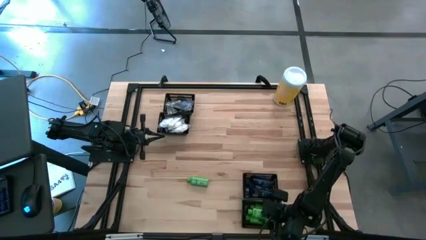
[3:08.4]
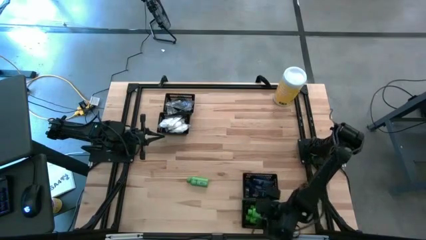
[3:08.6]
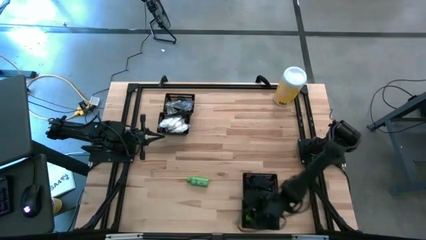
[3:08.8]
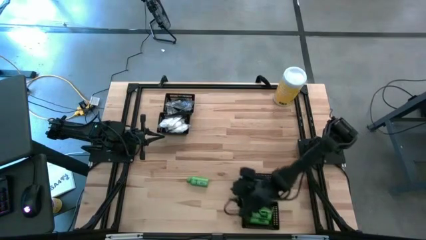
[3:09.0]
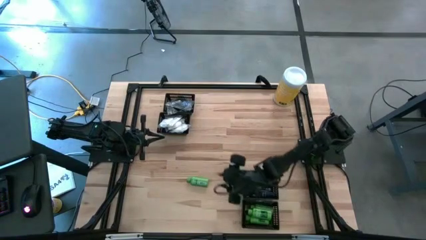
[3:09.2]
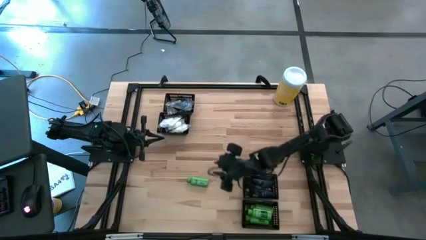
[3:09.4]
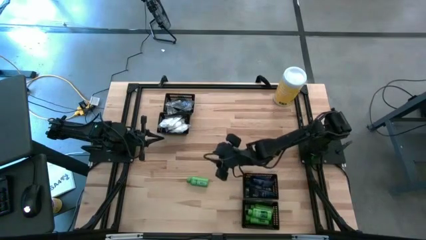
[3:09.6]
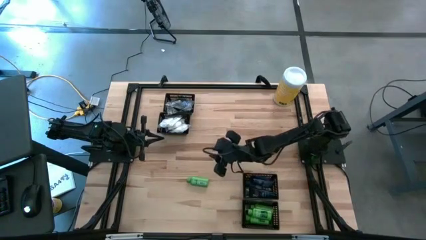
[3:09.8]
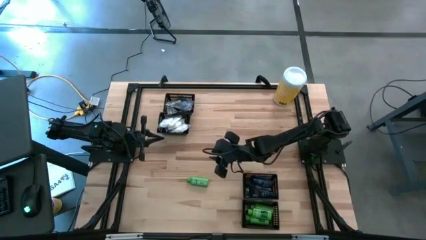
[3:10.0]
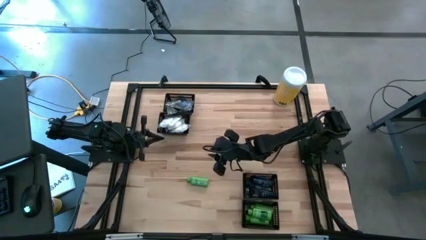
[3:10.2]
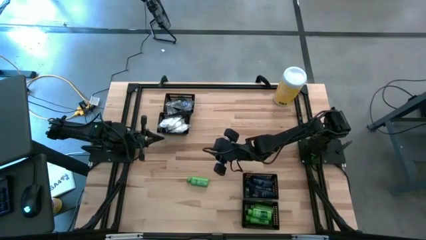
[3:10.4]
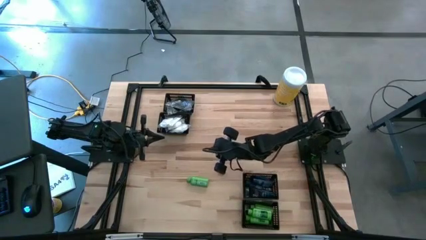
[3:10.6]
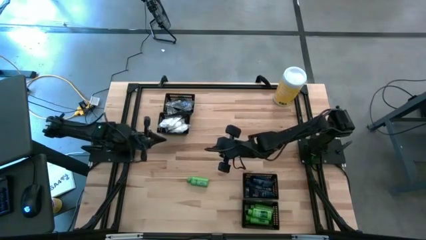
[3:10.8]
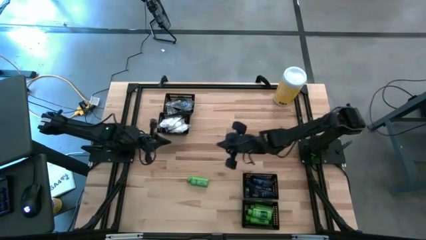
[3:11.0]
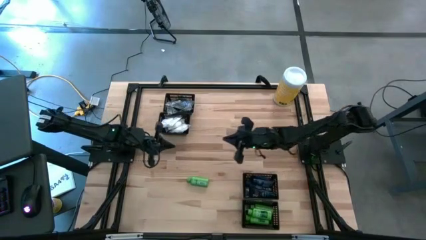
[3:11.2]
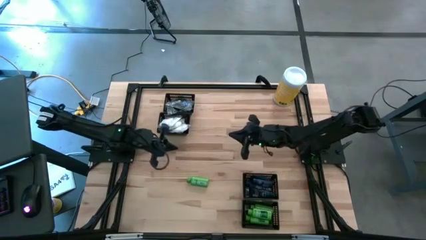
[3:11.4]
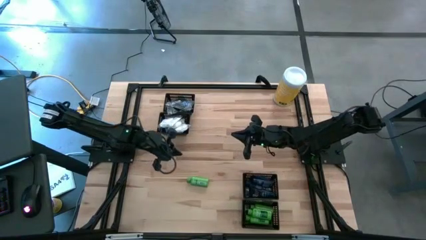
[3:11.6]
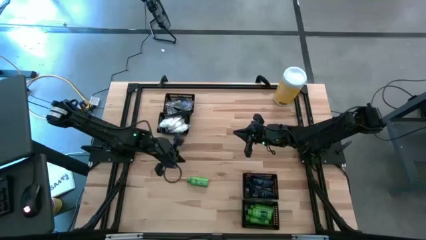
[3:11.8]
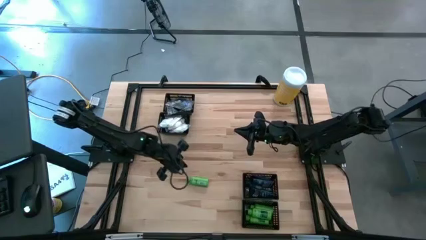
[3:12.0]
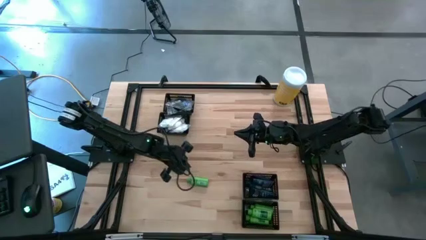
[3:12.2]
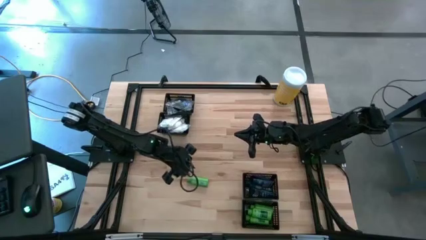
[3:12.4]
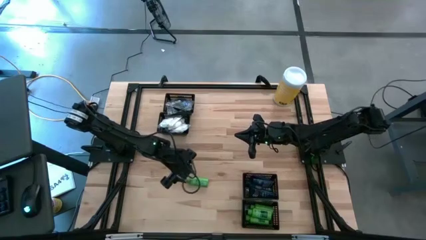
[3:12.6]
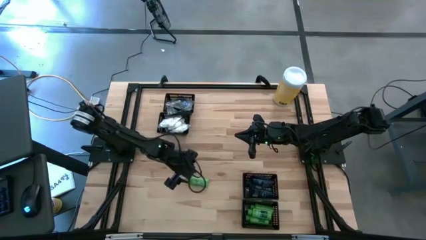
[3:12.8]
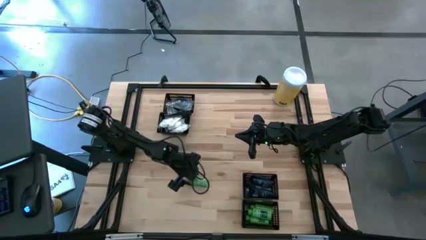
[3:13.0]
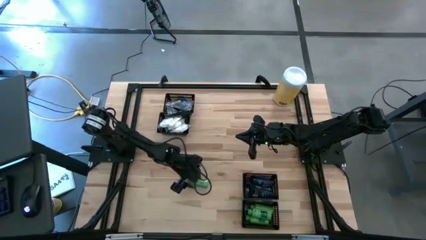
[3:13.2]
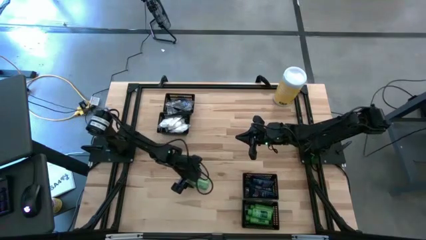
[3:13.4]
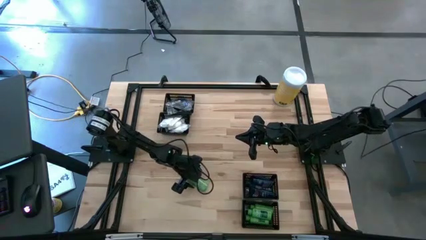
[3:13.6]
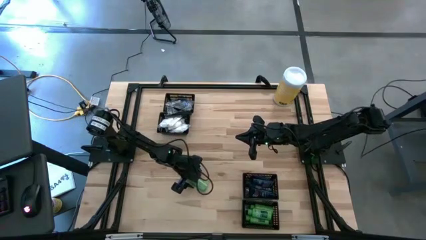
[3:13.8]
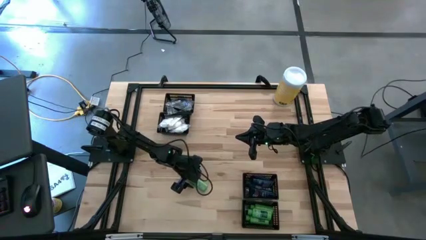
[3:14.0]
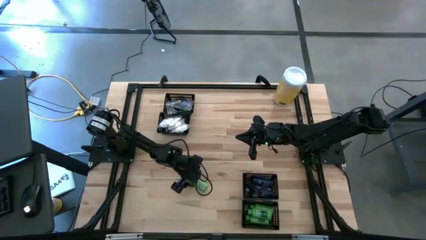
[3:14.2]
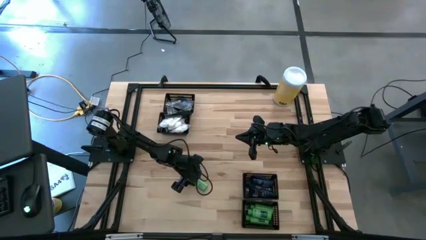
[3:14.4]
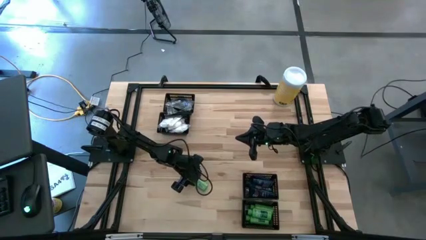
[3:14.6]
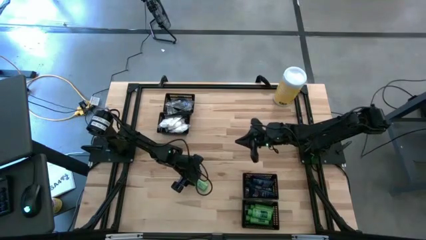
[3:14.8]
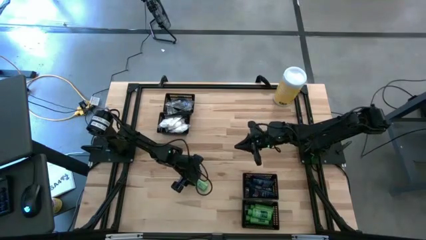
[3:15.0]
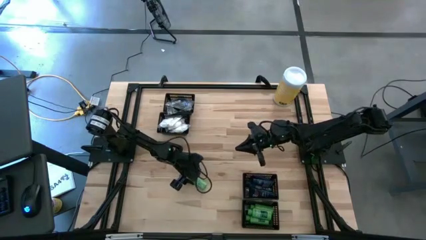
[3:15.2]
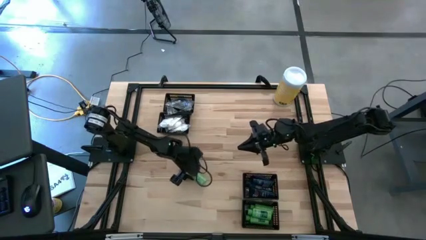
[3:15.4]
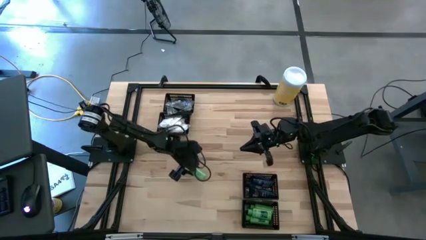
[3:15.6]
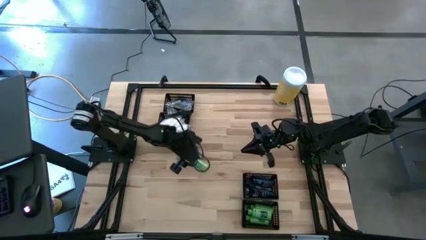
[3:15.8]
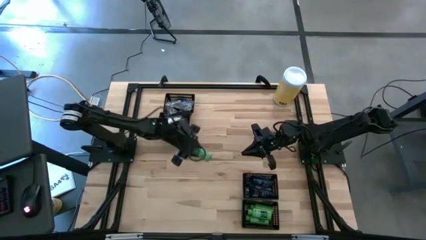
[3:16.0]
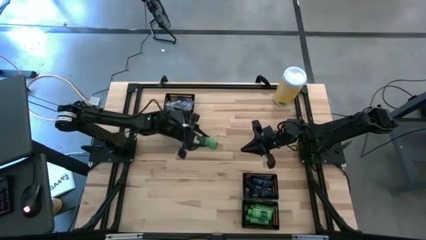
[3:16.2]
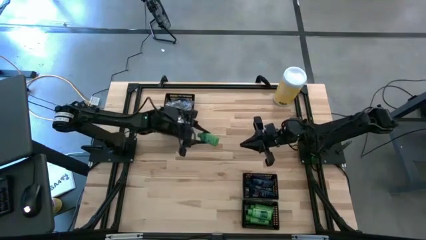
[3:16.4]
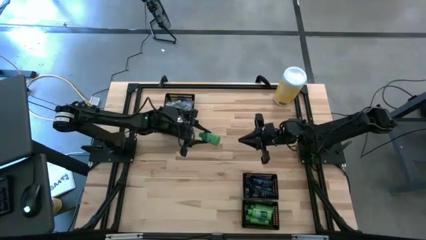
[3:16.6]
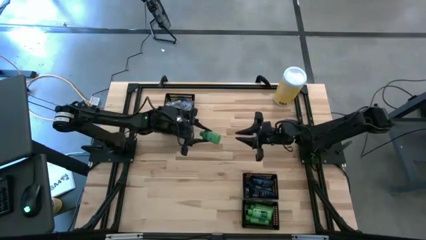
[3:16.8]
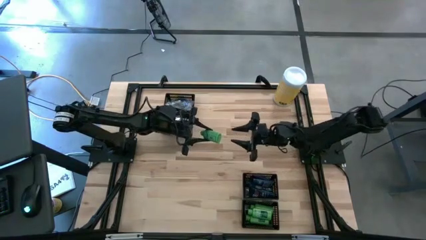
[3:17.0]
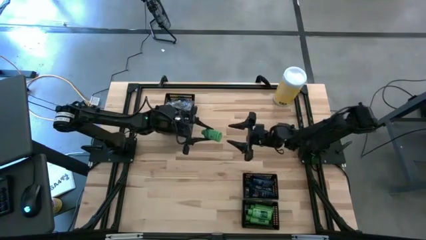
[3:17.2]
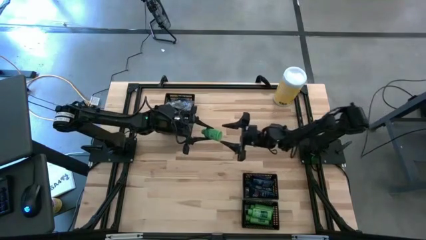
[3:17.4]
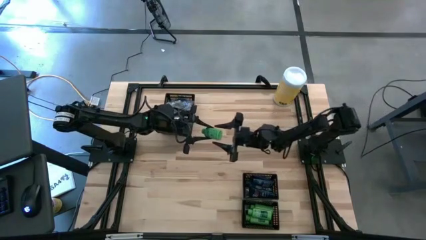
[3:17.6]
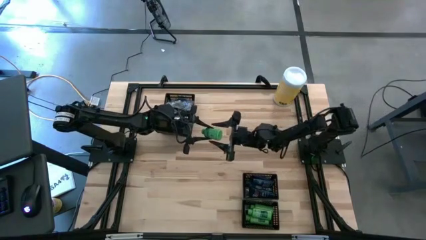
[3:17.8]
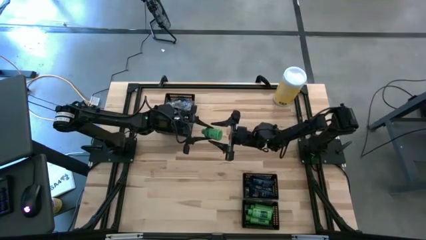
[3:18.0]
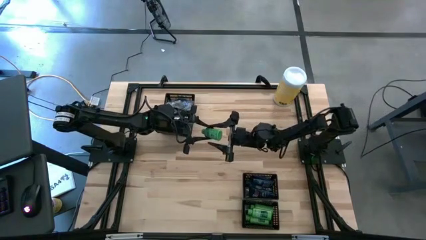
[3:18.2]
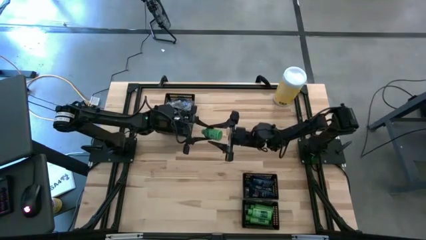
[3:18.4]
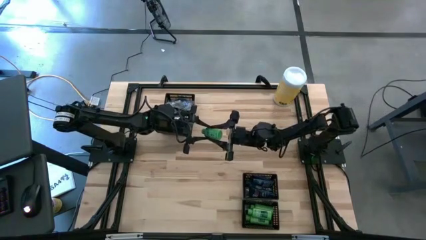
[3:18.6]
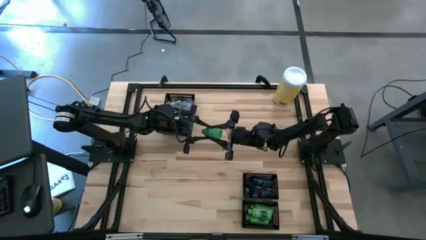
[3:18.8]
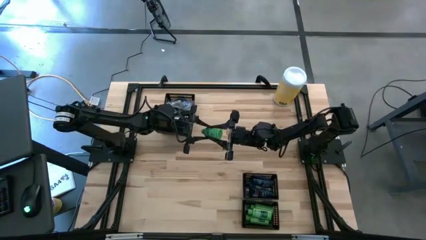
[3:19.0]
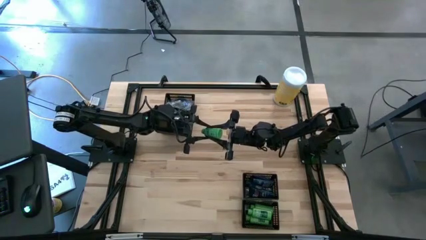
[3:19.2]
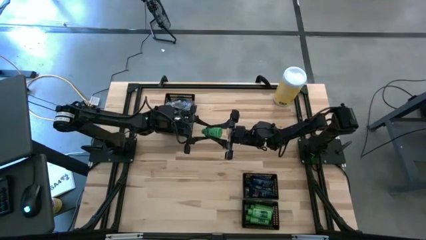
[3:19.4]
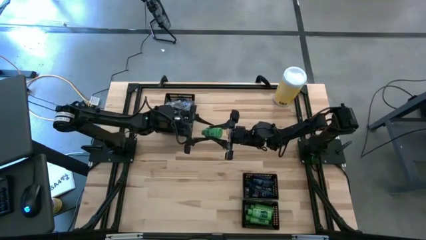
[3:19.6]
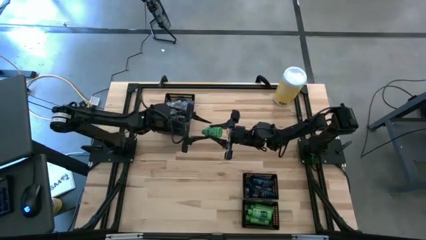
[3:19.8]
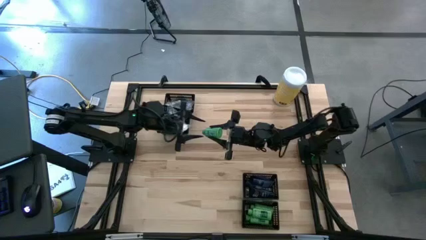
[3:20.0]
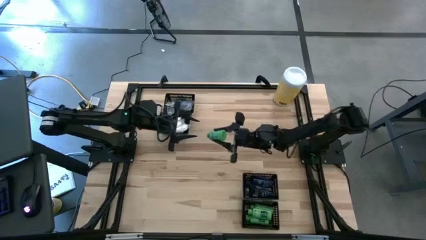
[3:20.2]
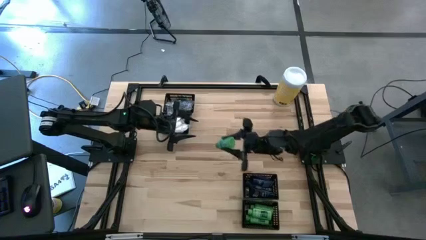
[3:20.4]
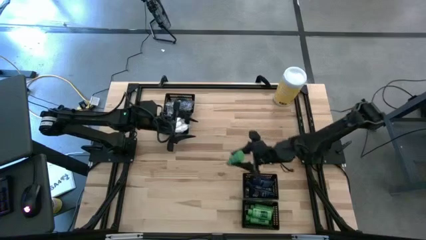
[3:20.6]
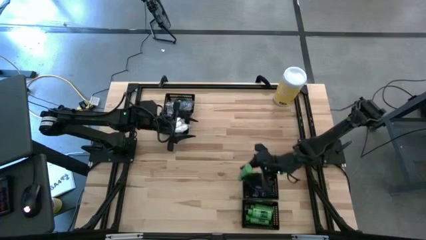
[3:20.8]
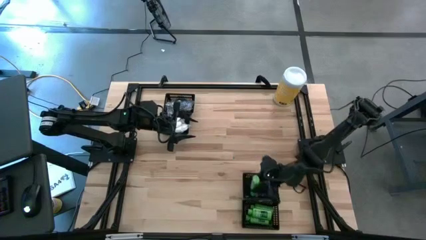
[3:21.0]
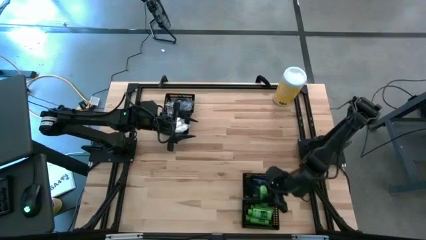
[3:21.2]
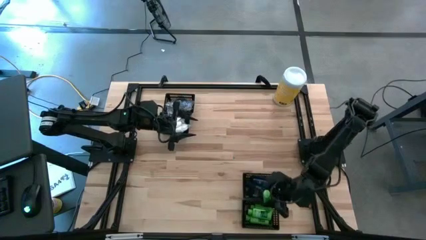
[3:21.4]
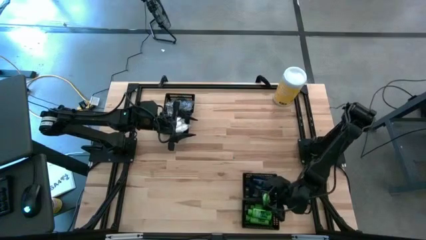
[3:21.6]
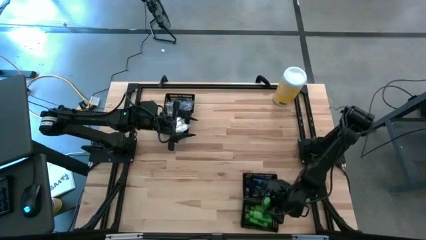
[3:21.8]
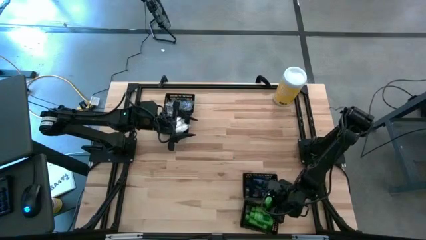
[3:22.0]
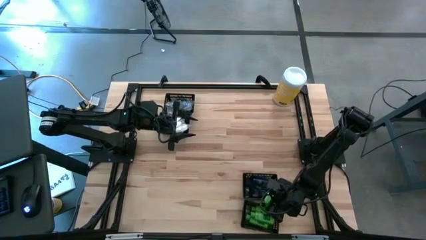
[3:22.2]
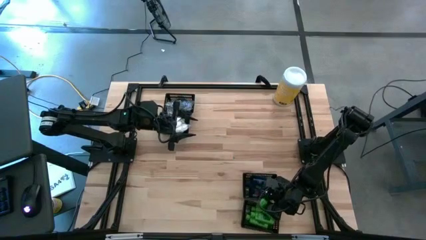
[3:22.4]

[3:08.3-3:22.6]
Task: Pick & Place Travel size toiletries
Put the green shampoo into the bottom black basket
